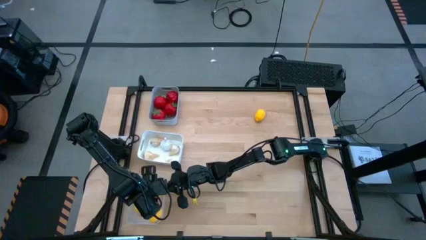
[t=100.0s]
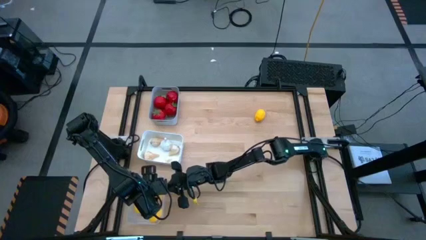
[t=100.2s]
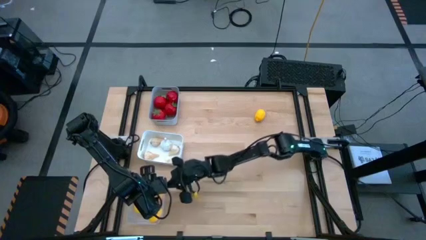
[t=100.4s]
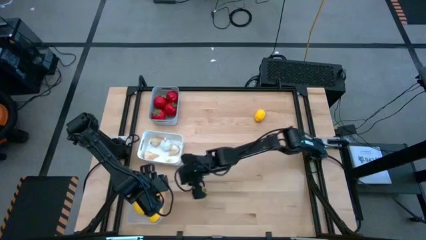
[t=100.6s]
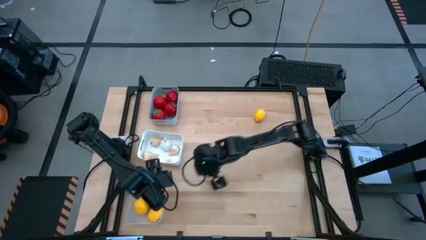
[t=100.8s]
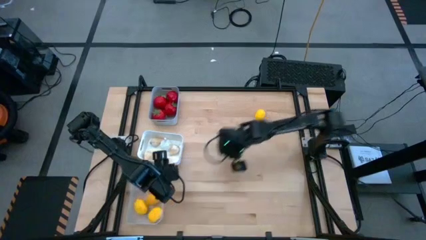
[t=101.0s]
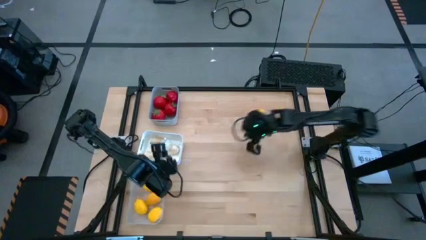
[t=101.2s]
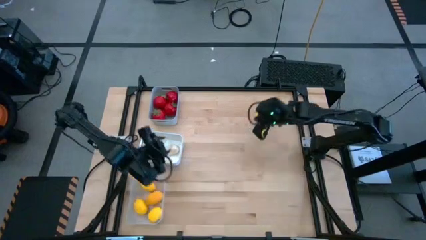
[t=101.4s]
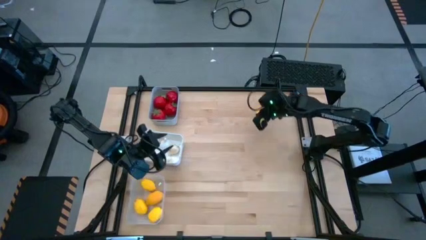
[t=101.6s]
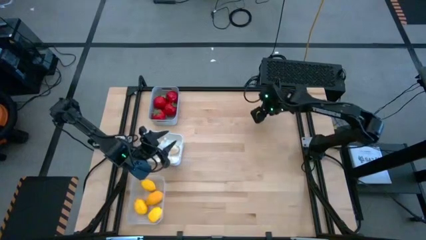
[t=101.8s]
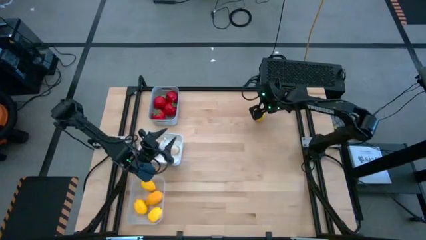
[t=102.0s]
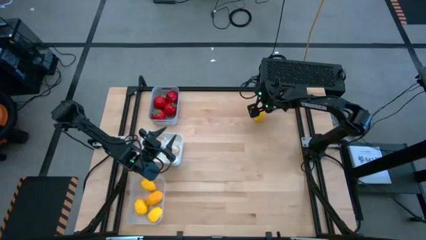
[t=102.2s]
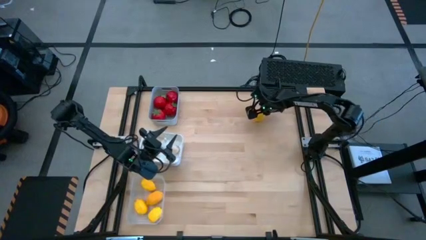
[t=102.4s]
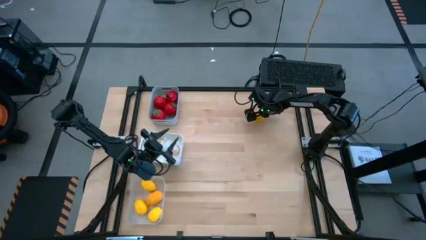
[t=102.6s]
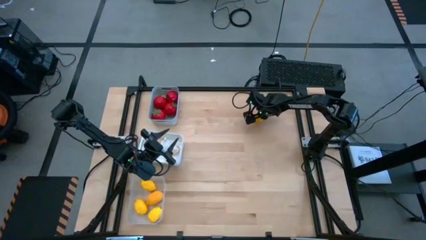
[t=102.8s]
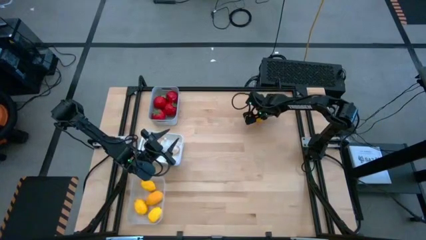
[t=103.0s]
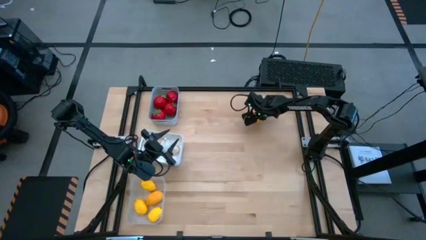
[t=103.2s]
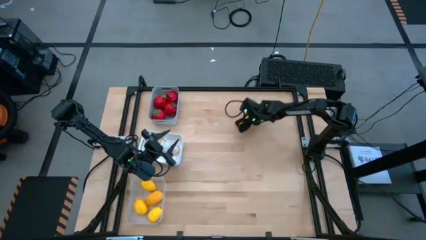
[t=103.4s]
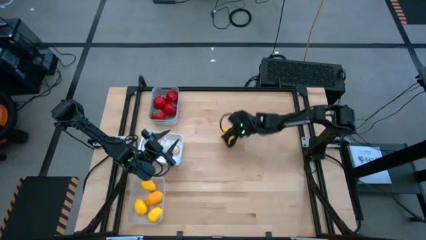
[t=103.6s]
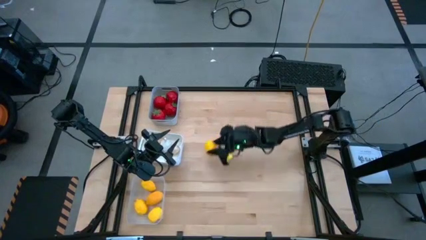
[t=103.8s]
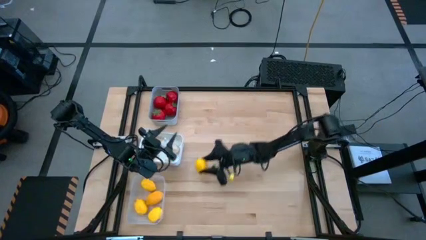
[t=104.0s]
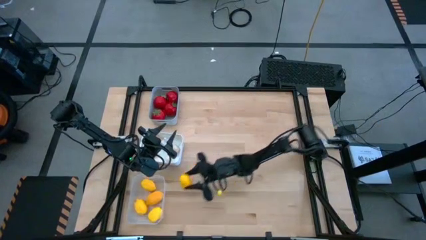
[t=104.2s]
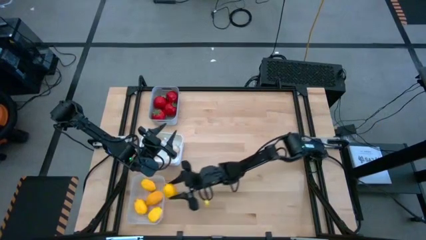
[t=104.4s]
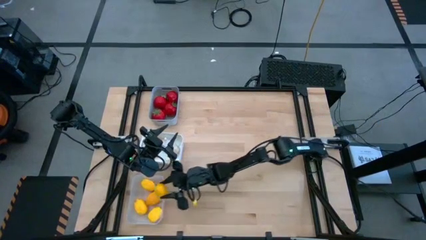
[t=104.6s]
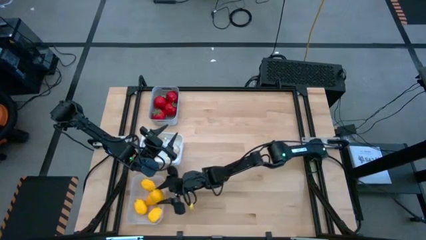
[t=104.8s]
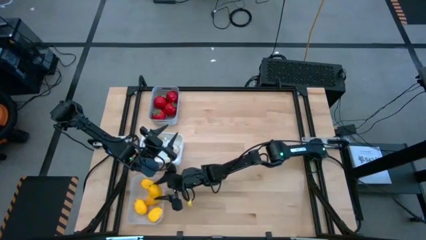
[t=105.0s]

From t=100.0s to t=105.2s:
Task: Sort produce into baskets
Put the yellow lemon into the transparent bin

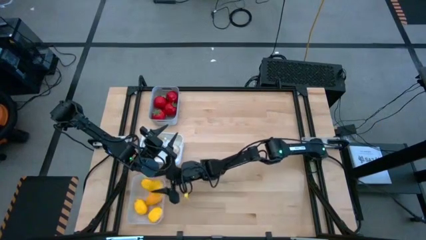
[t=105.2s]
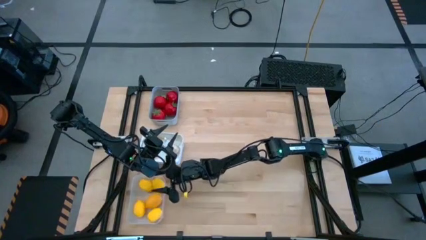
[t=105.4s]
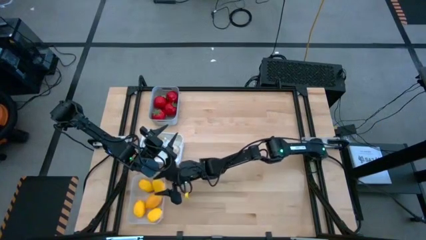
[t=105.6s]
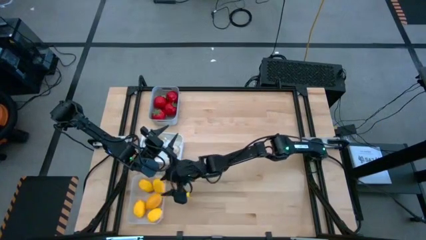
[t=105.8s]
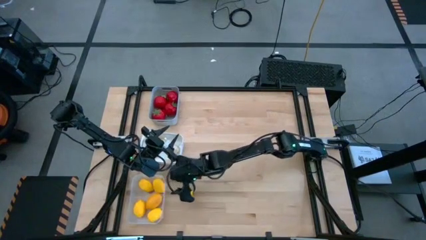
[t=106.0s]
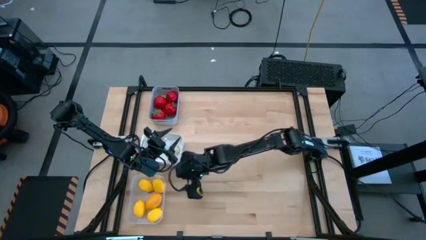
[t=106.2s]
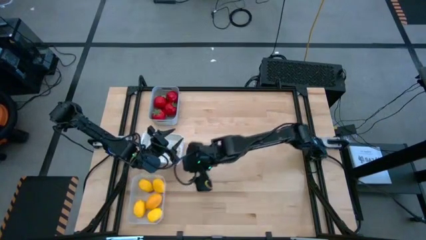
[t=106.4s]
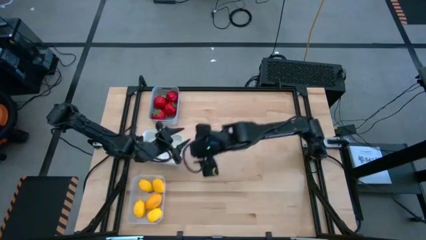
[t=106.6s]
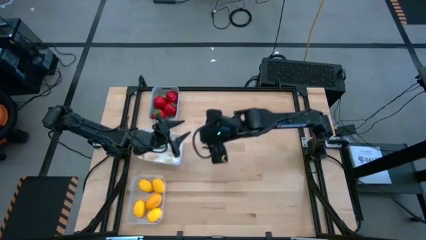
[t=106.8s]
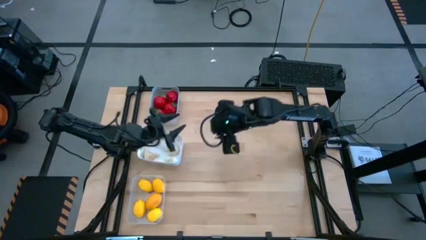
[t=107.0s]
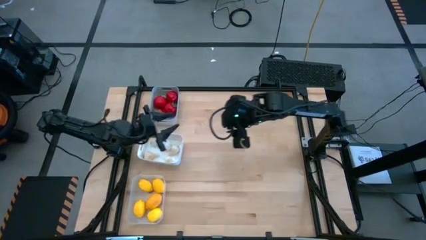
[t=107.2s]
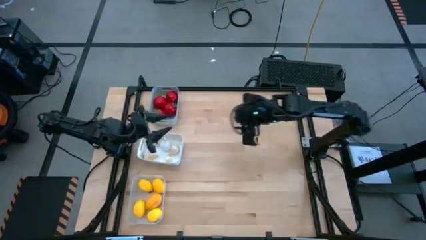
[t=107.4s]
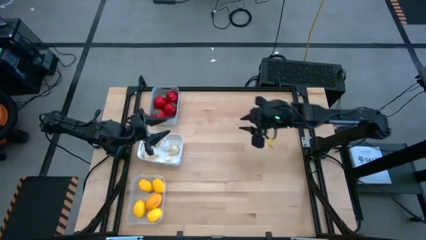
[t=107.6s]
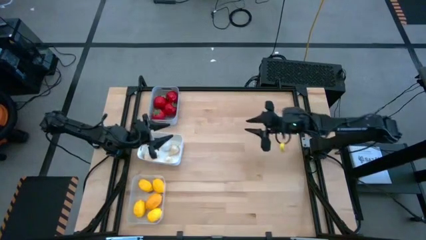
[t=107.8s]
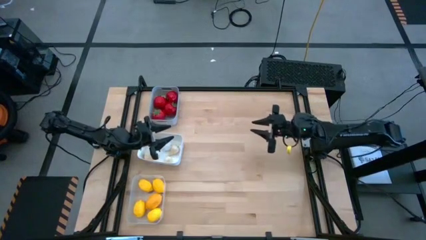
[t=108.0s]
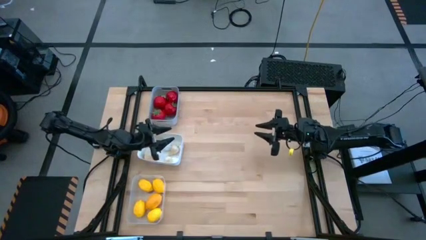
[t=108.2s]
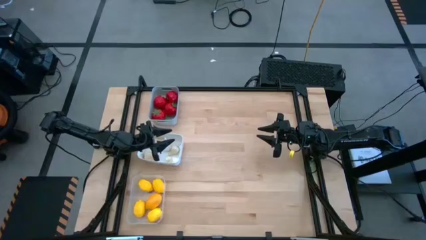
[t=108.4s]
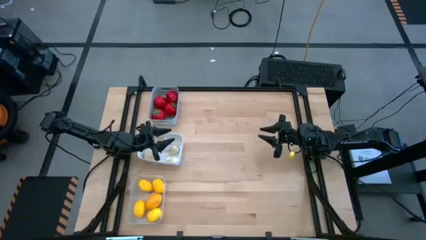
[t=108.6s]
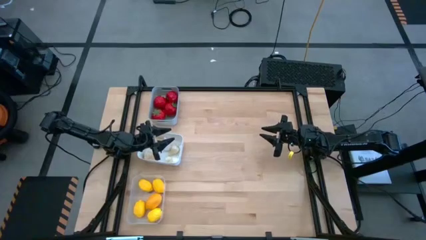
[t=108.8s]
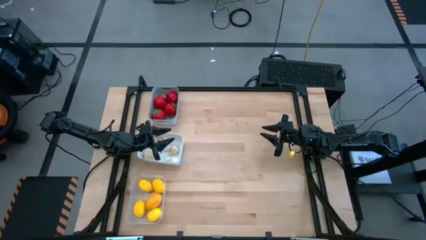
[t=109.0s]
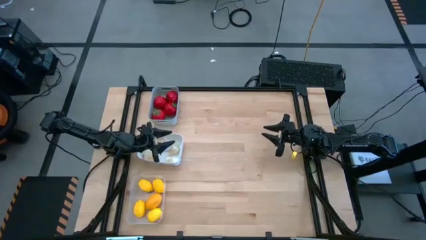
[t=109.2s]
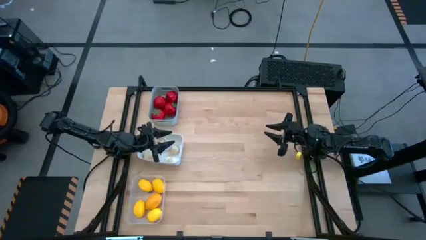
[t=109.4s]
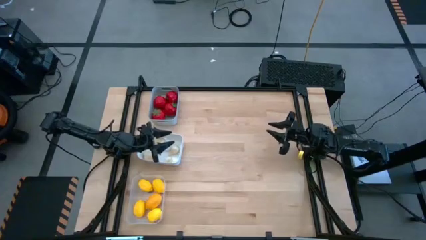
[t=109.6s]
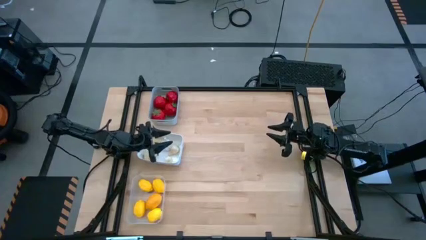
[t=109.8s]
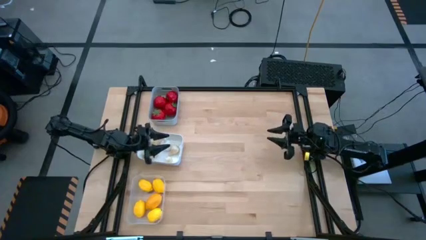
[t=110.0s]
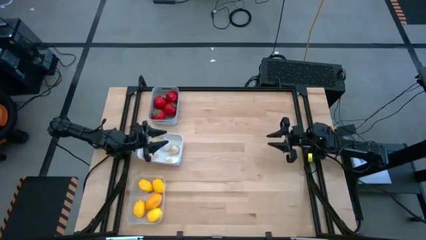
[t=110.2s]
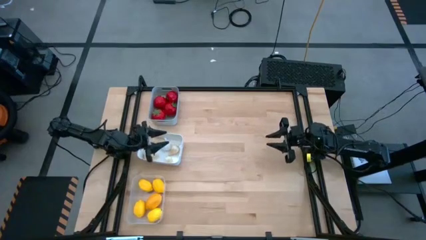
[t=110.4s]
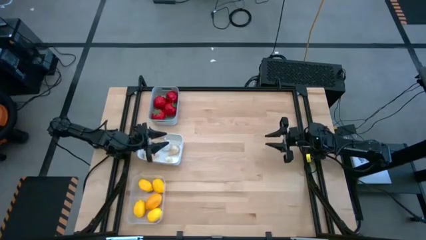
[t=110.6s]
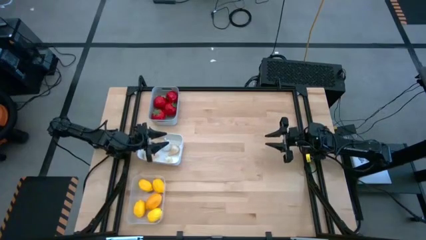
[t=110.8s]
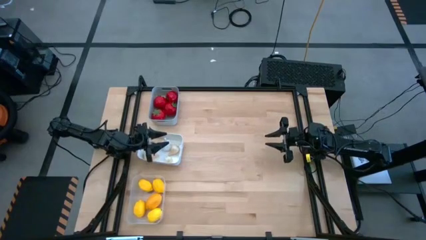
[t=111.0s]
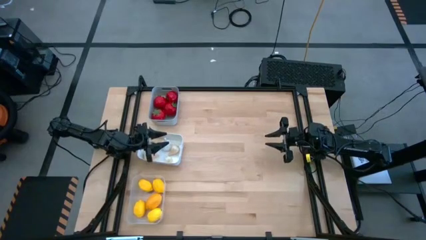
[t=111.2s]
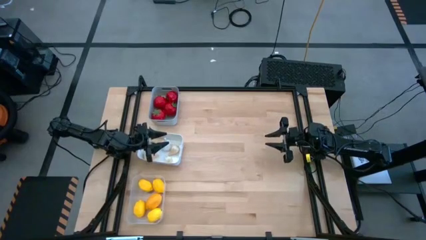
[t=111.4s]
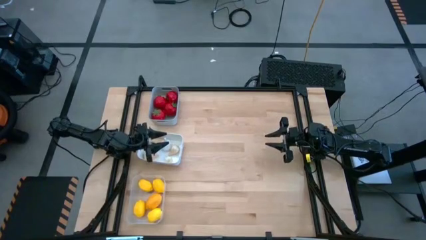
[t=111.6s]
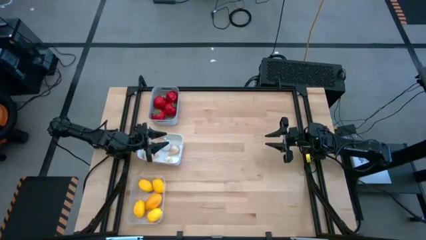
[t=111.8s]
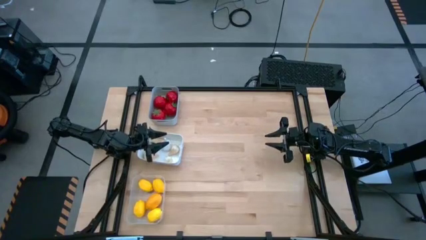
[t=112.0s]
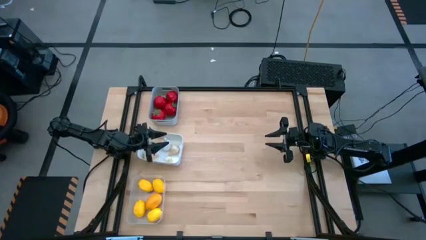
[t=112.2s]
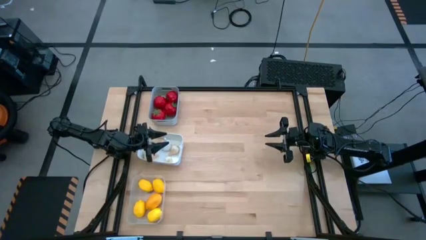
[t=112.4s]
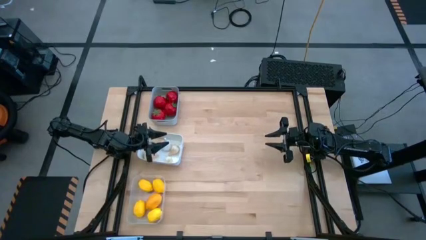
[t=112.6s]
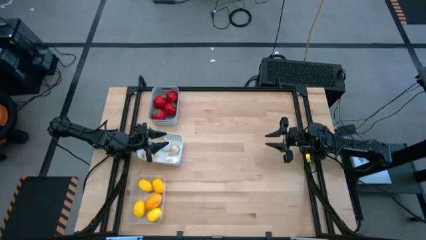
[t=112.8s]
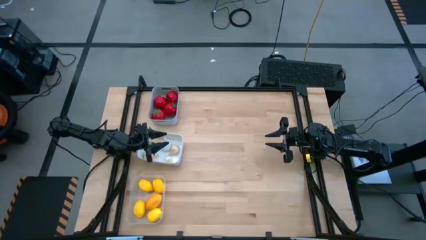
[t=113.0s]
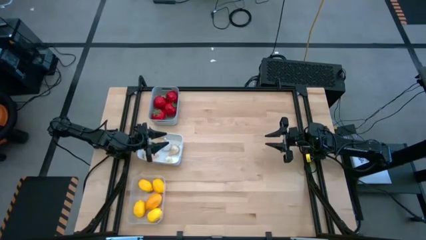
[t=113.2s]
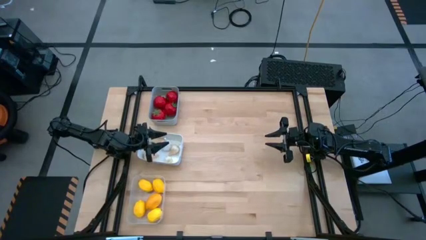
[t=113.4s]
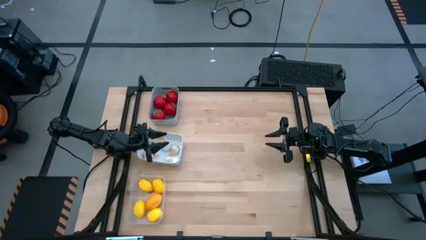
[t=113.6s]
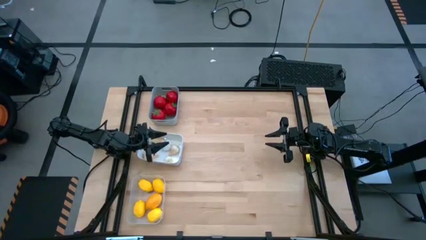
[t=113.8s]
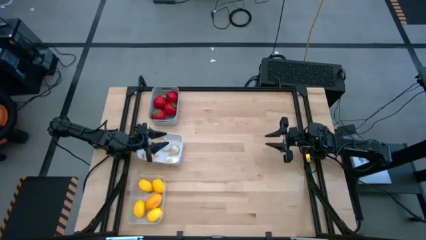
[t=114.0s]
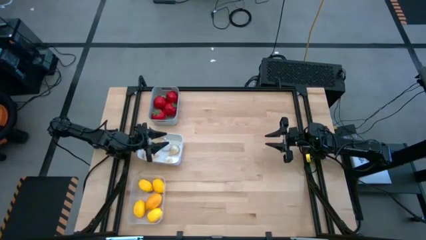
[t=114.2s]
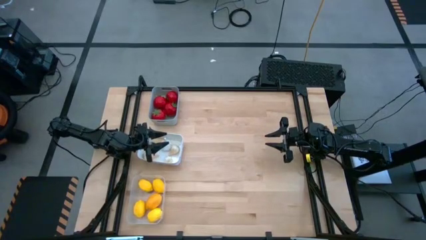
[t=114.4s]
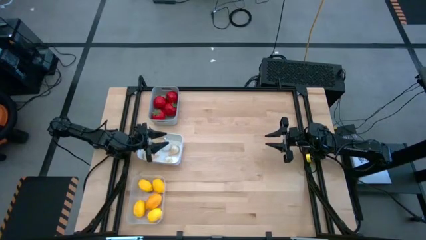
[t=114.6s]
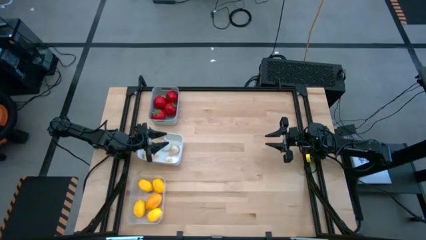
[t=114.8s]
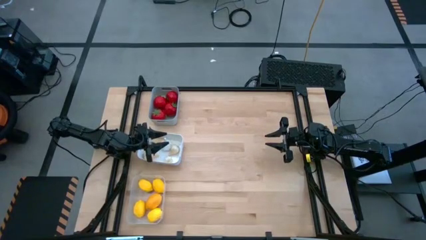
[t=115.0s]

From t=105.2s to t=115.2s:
Return to Home Position

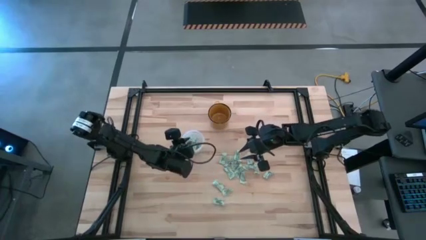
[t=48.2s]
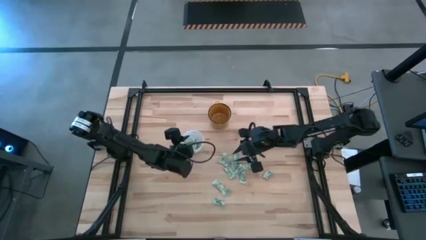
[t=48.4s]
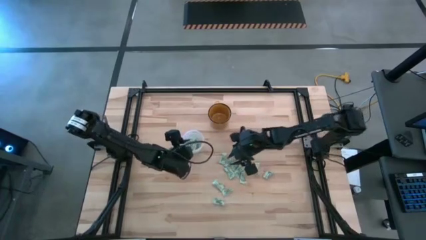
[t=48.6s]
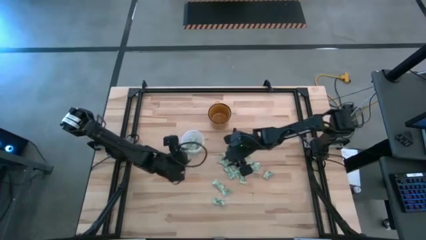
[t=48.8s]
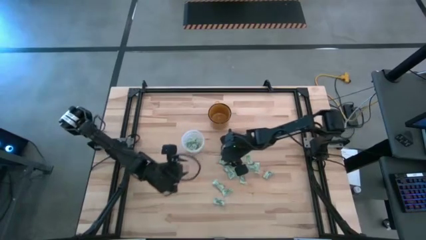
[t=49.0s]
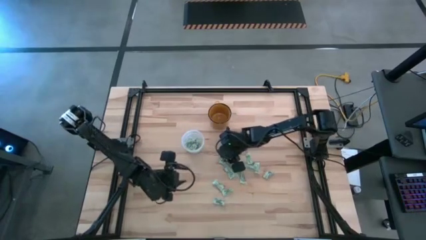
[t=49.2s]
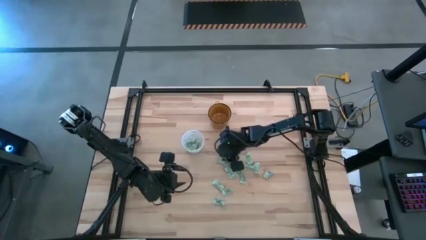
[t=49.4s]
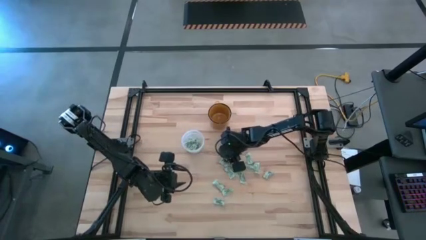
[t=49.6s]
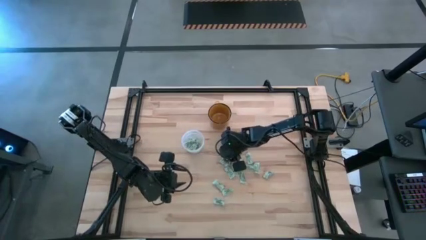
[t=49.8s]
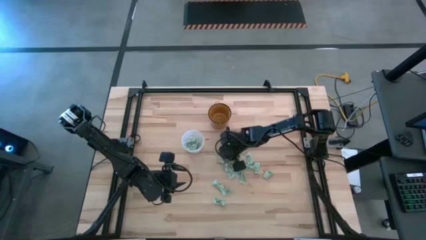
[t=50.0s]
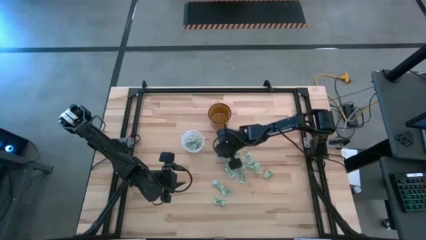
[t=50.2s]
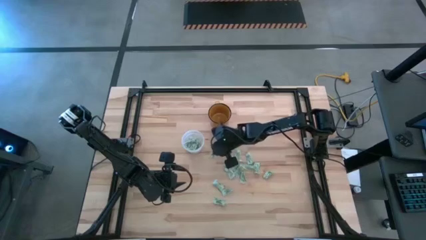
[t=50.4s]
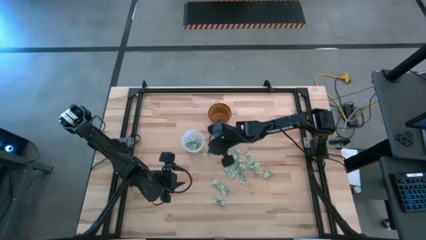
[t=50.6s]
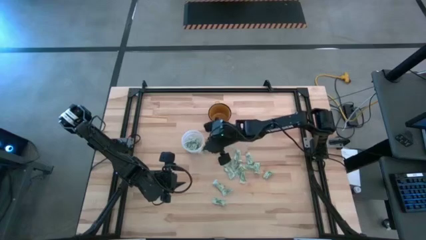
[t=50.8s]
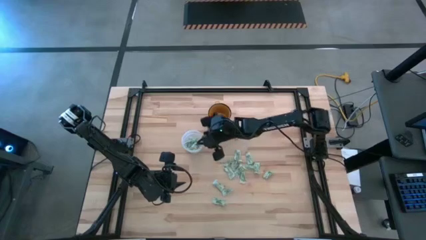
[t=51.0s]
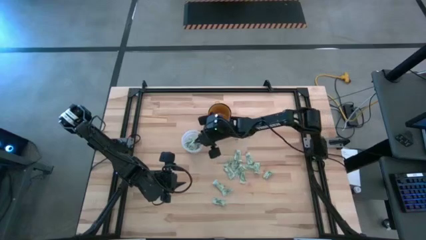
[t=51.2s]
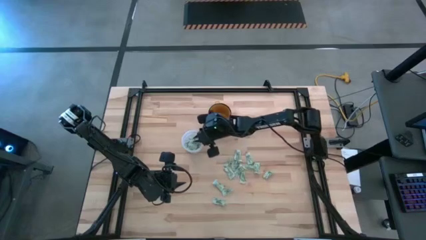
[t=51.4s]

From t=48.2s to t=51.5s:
Task: Pick and place Stevia / Truvia into bins
Put the stevia packet into the transparent bin
